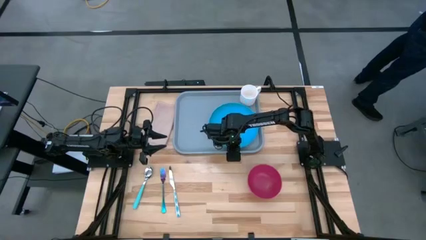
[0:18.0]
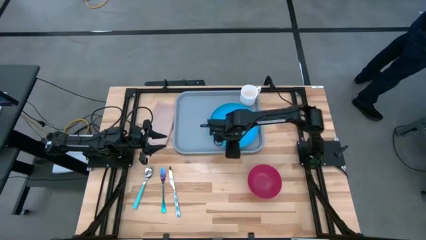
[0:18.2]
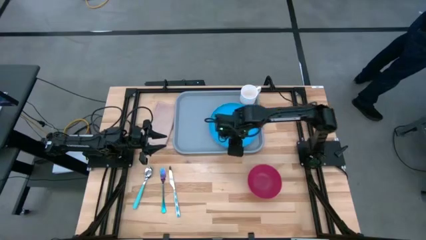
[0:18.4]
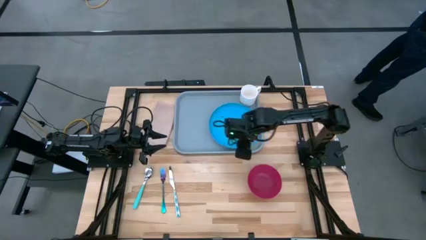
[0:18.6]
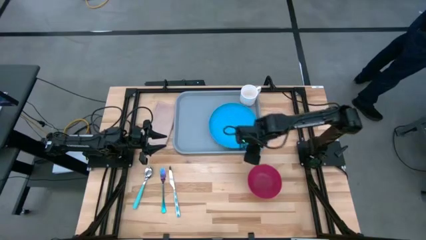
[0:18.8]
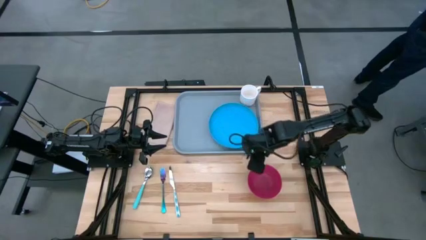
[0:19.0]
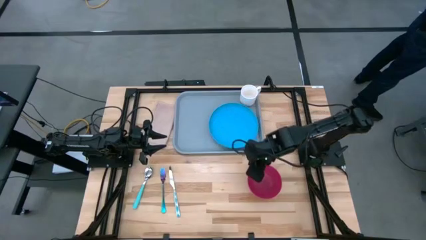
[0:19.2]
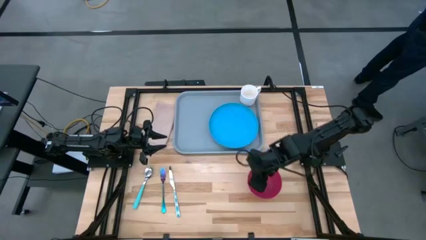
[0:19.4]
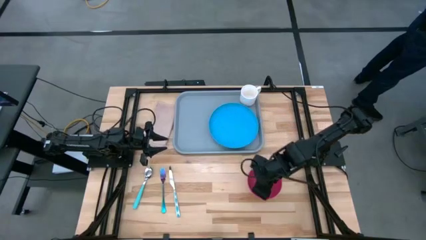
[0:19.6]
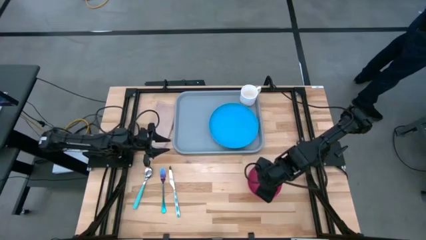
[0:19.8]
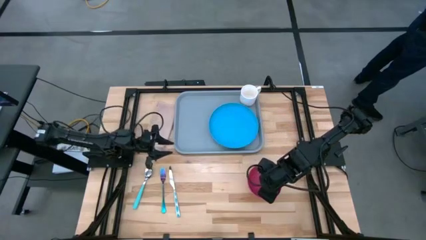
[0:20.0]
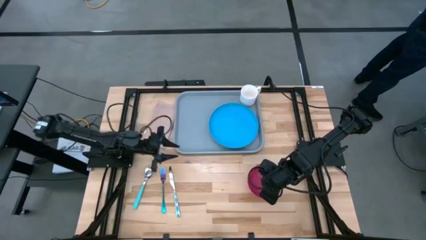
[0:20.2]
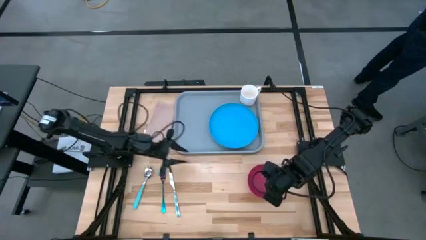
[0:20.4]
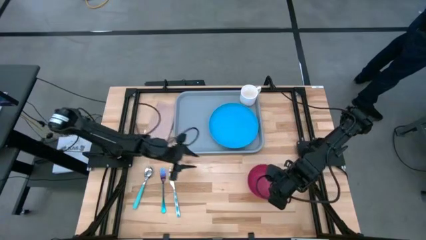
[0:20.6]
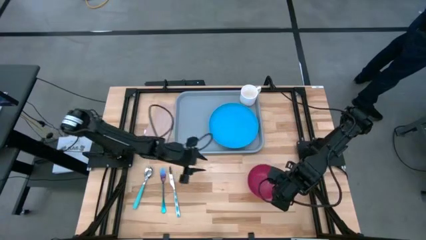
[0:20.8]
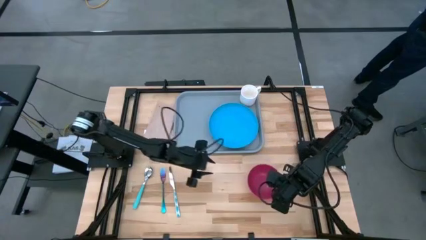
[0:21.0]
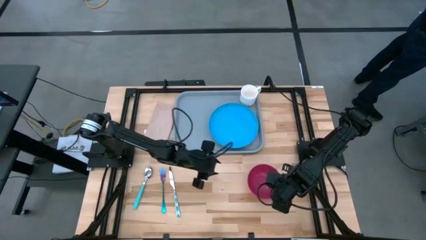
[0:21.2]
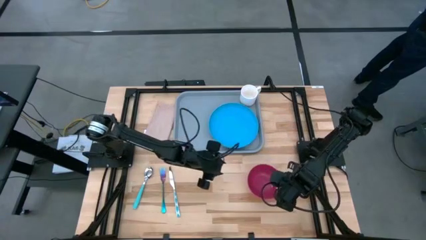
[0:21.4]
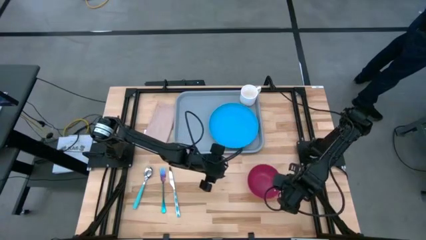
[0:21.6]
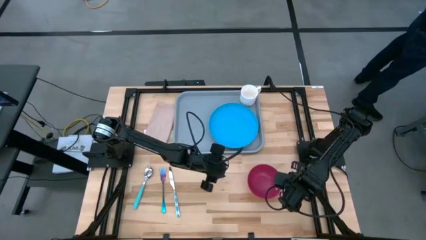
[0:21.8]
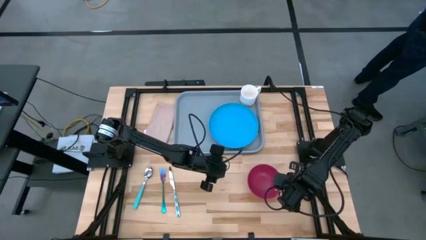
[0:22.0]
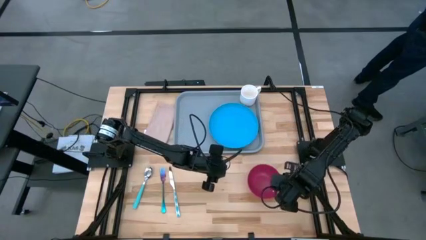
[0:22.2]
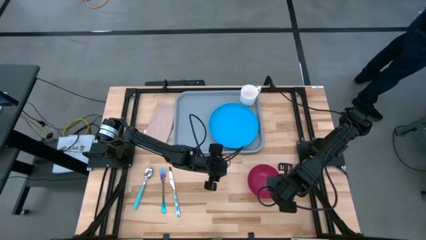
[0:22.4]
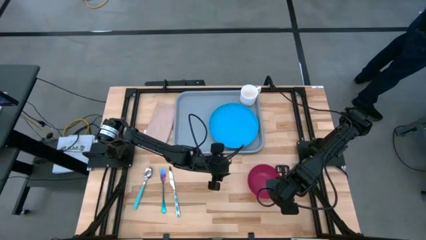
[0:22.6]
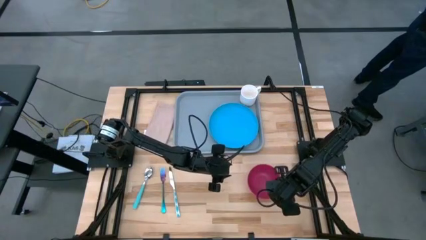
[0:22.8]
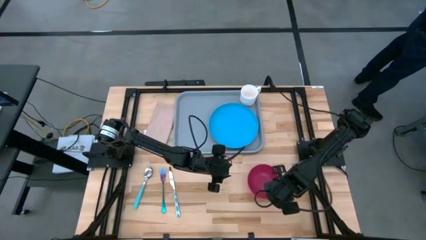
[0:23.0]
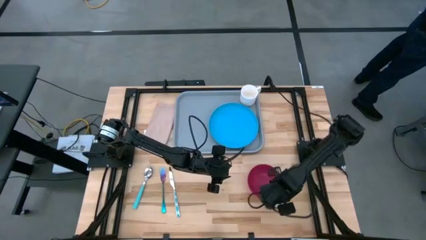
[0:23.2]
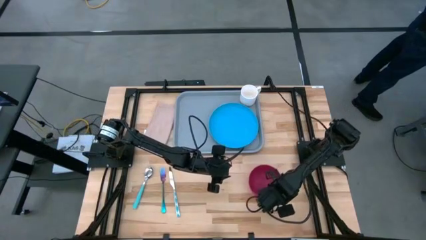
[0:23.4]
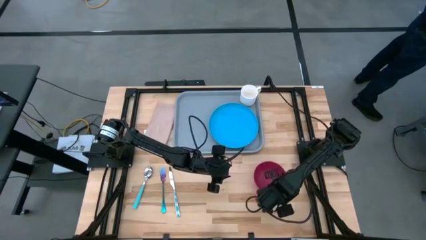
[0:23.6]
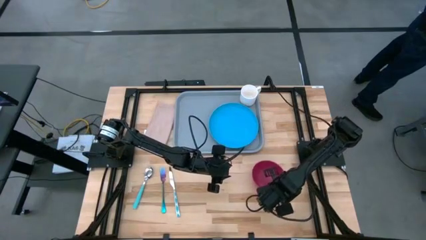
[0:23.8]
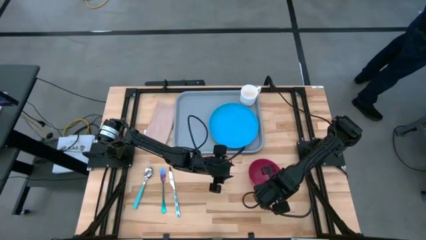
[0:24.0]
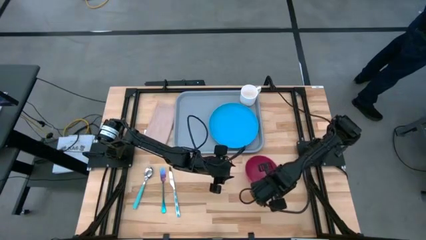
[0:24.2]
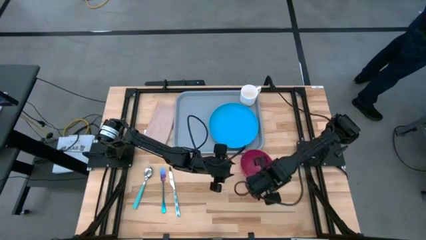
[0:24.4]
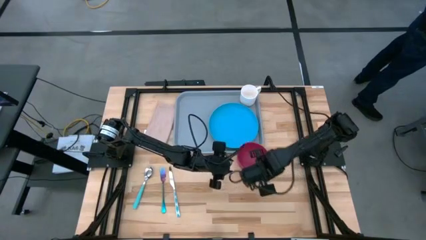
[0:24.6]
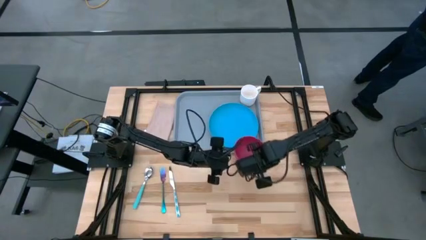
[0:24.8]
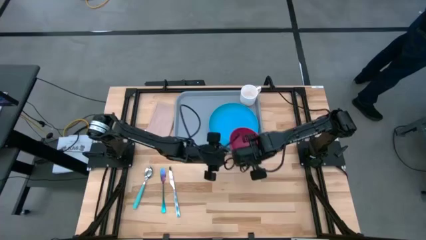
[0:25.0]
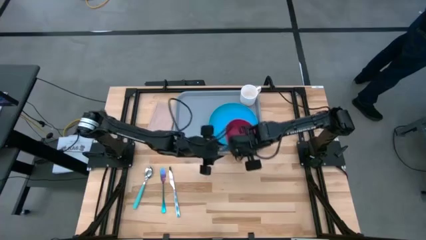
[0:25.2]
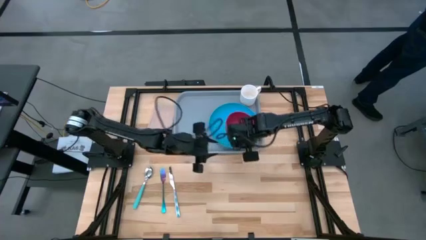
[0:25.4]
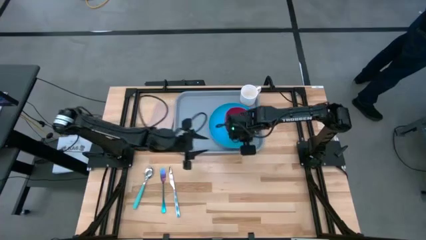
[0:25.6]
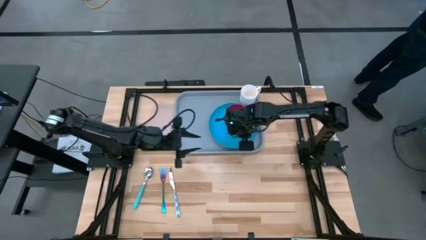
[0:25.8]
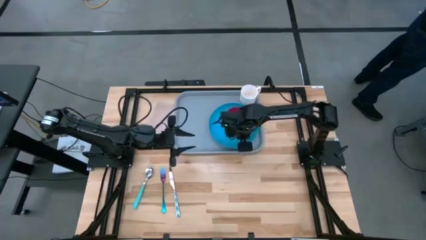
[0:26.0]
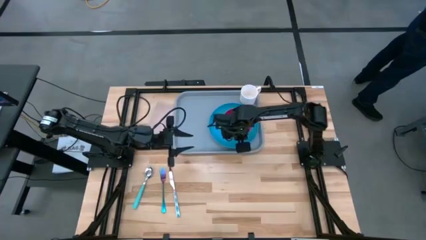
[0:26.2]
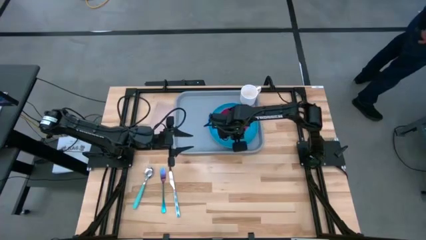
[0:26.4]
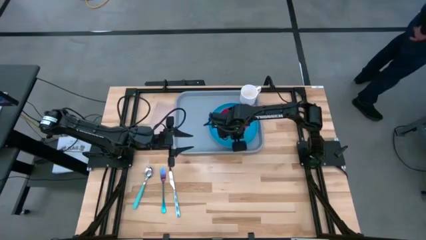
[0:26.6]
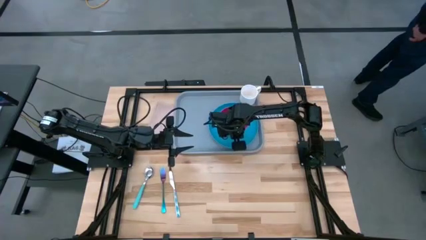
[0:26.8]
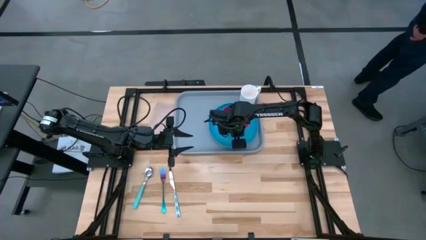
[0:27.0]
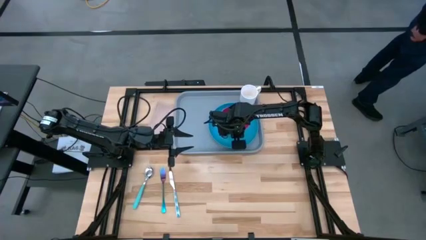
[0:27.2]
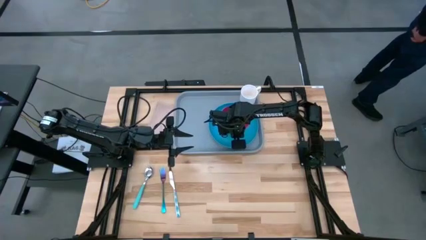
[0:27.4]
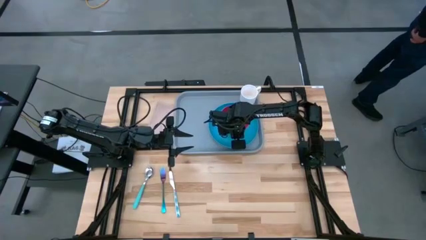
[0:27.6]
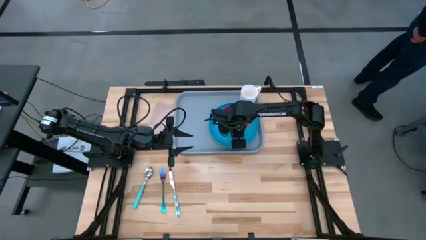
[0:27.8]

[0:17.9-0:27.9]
Task: Set up tray
Put the bowl on the plate on the serving tray

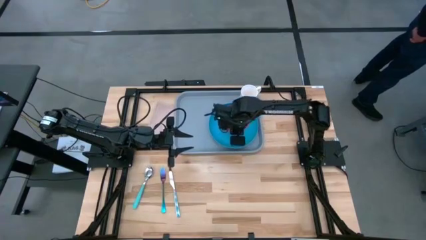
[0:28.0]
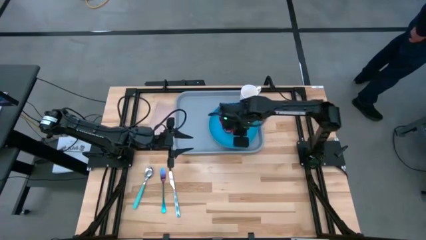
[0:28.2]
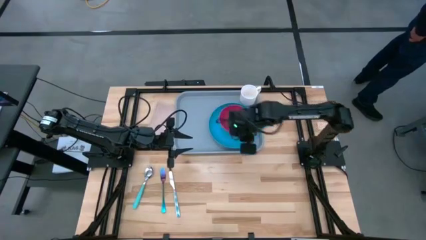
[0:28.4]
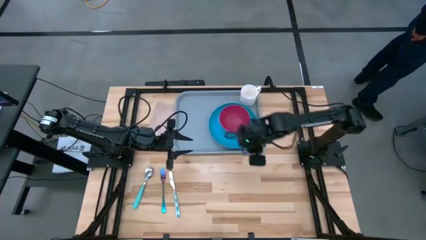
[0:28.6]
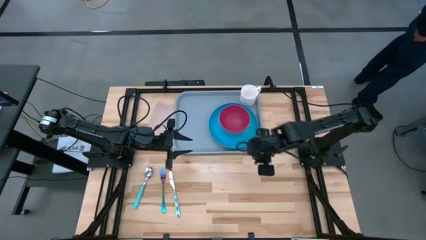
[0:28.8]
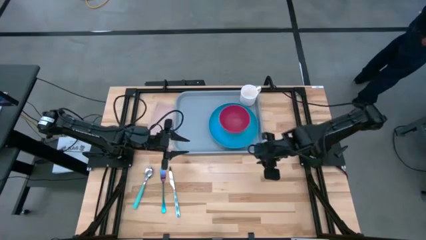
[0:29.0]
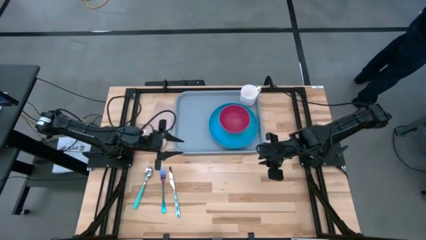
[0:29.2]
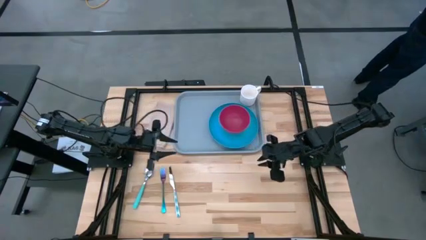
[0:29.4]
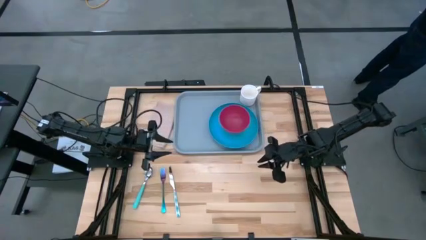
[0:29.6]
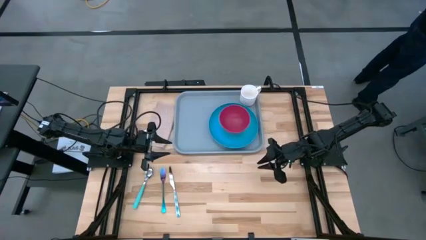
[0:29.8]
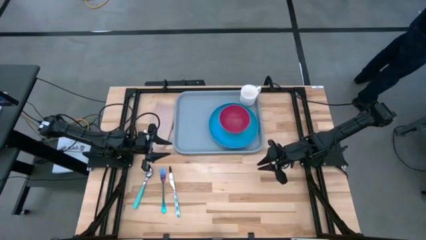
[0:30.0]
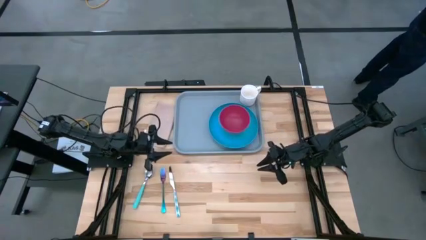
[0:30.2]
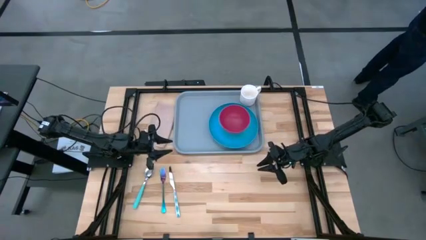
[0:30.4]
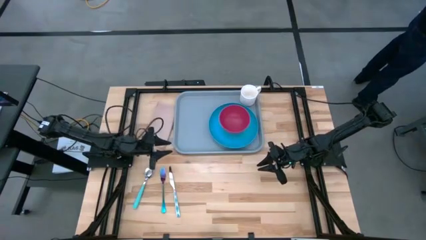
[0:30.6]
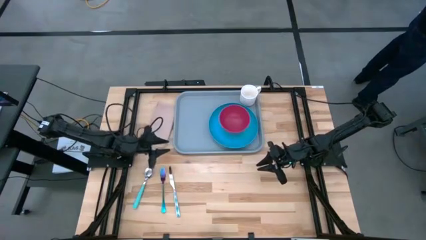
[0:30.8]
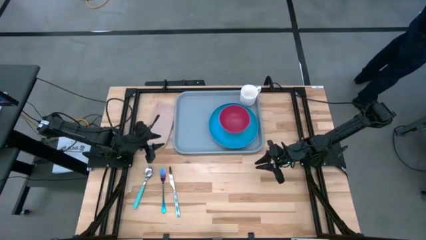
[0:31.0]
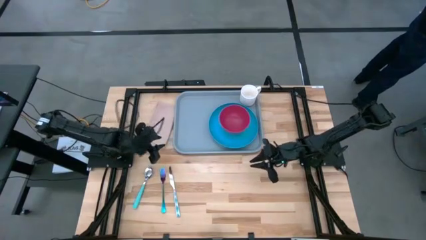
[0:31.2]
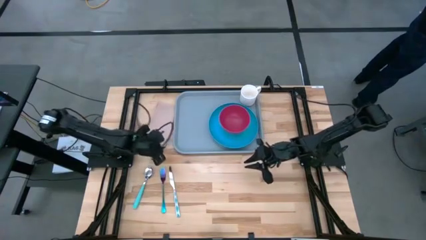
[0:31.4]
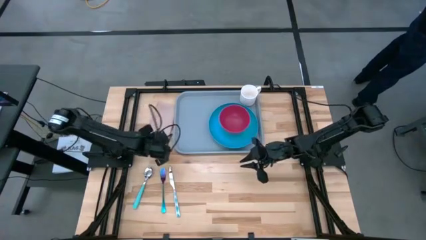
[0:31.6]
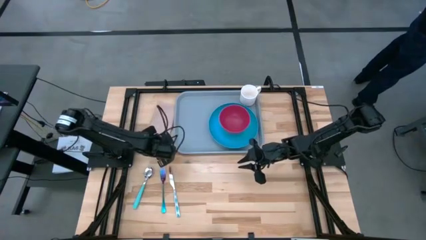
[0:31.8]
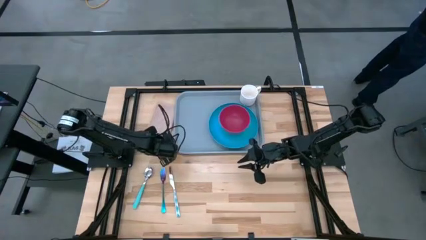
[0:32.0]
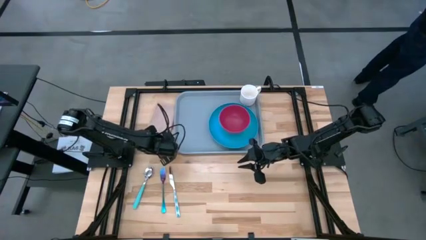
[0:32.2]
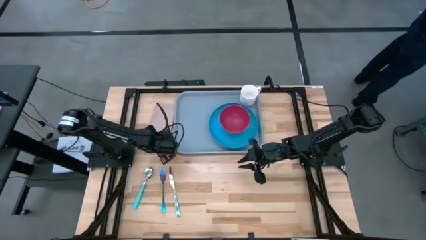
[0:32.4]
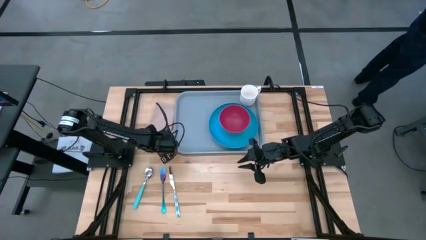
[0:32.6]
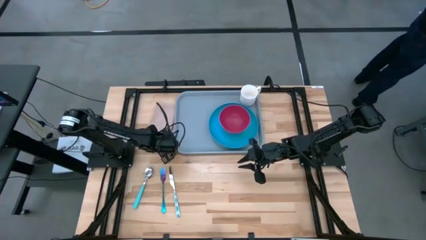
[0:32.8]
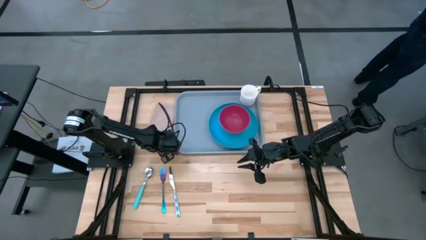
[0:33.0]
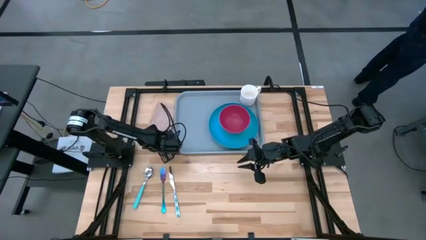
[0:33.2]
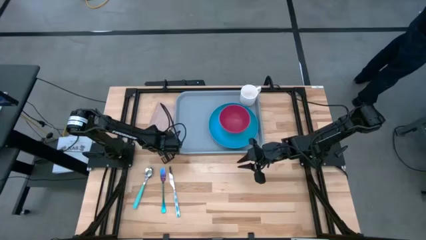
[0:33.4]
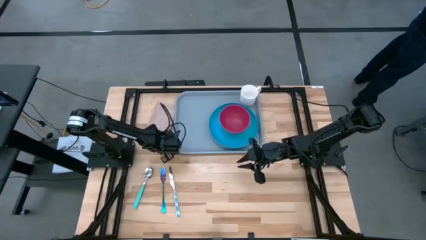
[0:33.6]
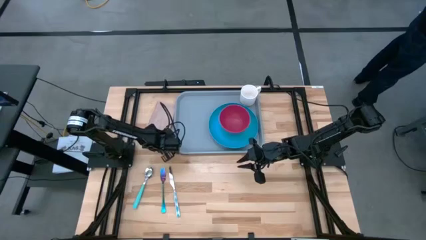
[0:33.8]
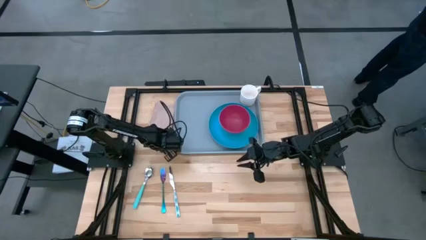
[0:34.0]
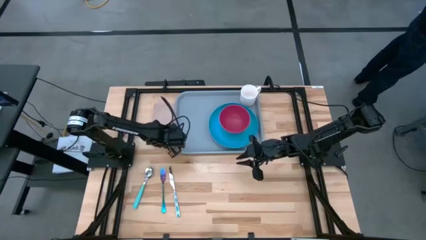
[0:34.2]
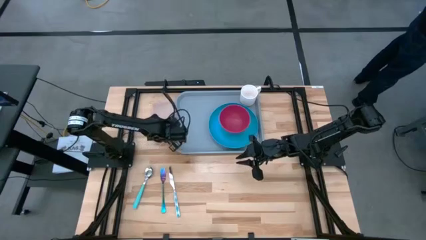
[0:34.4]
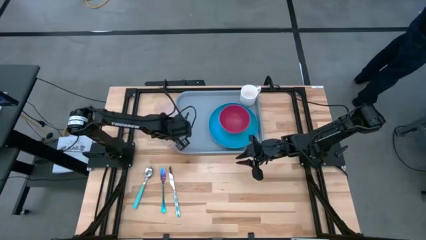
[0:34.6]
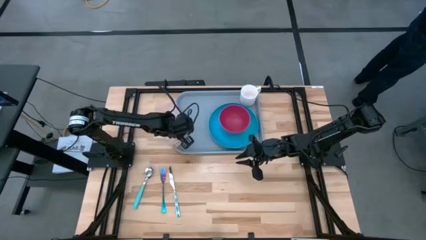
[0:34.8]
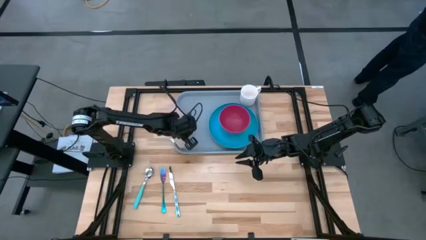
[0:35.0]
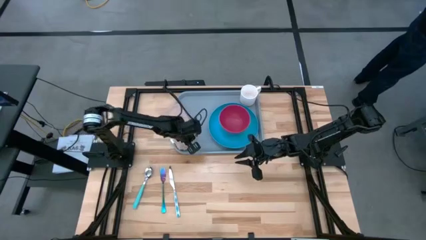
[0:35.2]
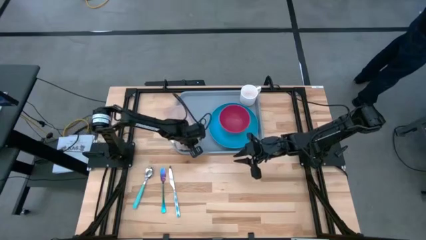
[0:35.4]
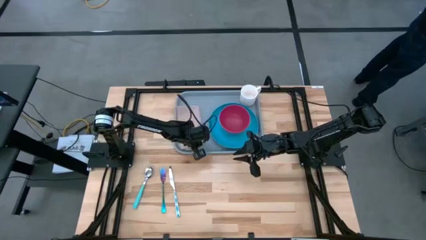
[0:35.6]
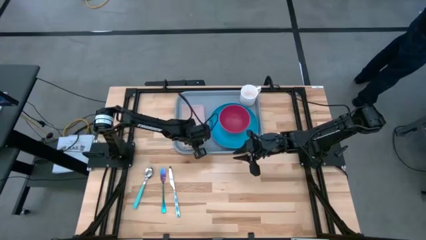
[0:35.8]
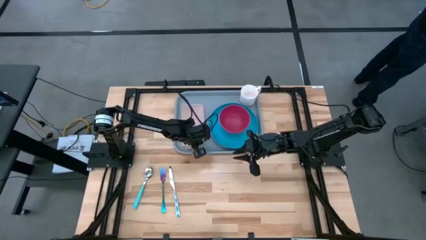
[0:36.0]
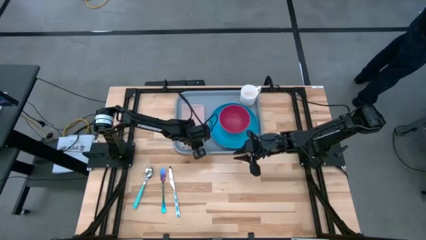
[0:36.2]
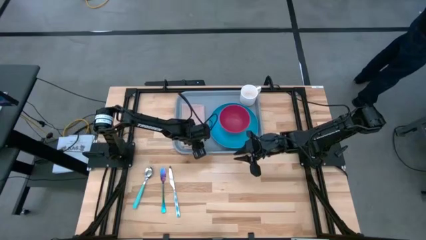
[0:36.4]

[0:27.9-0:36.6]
Put the napkin on the serving tray to the left of the plate
